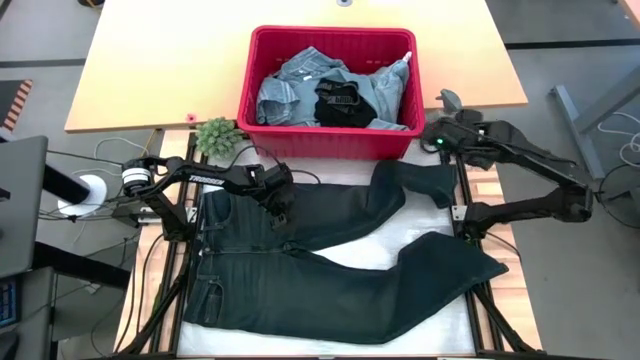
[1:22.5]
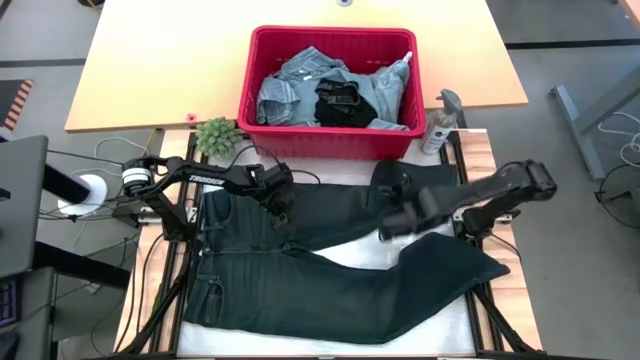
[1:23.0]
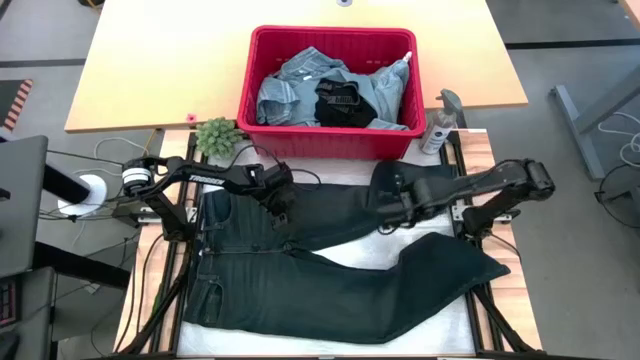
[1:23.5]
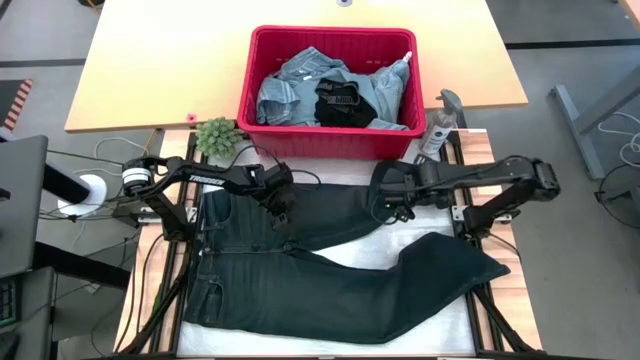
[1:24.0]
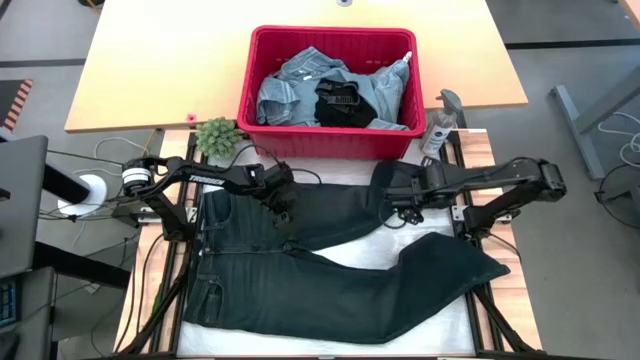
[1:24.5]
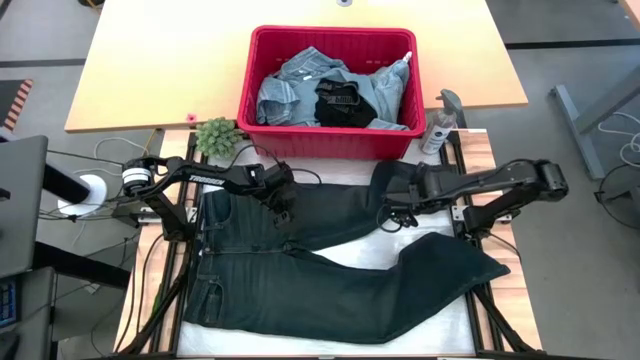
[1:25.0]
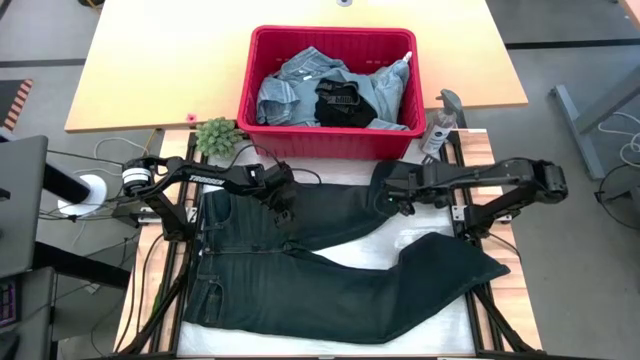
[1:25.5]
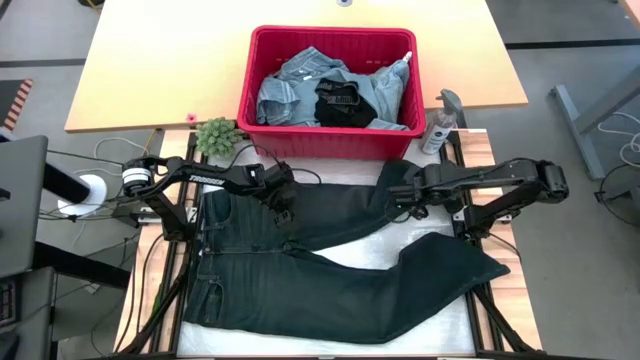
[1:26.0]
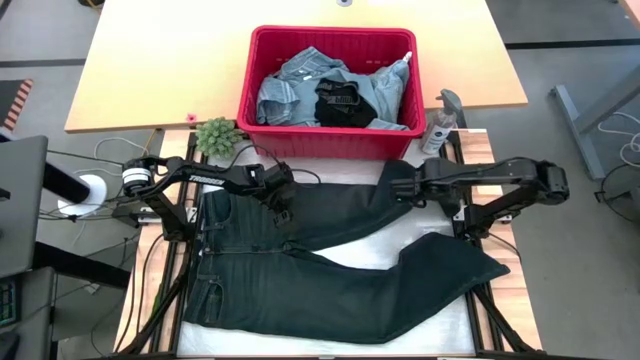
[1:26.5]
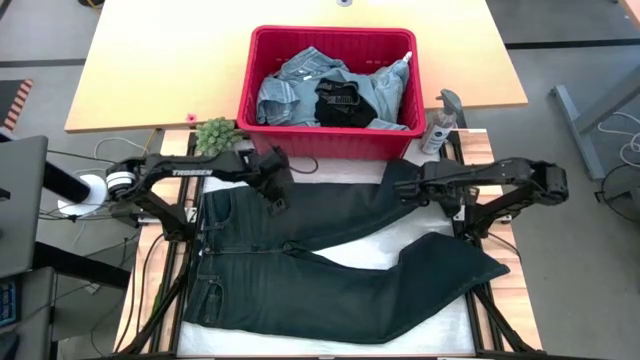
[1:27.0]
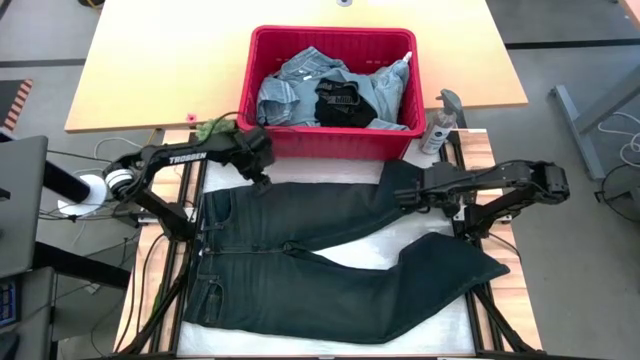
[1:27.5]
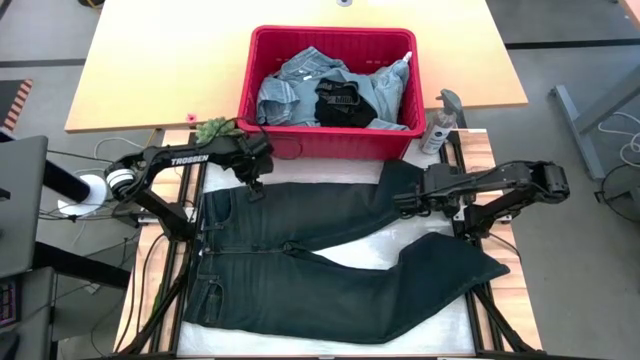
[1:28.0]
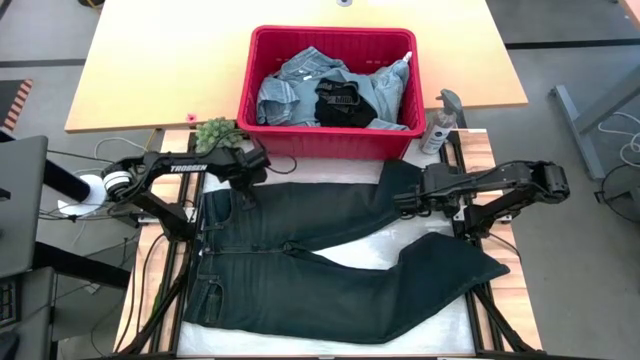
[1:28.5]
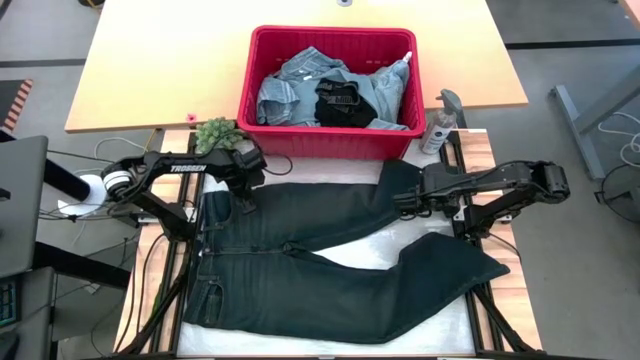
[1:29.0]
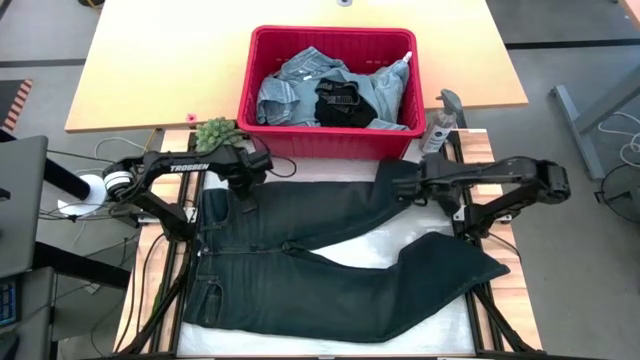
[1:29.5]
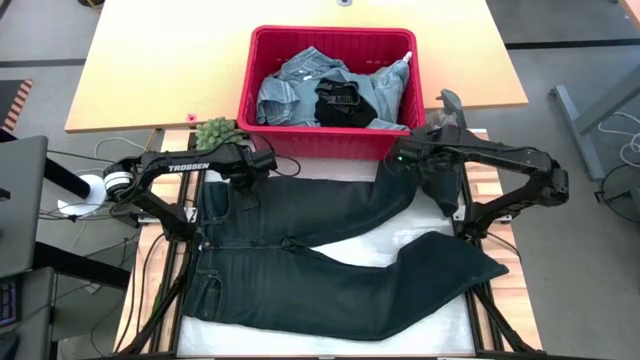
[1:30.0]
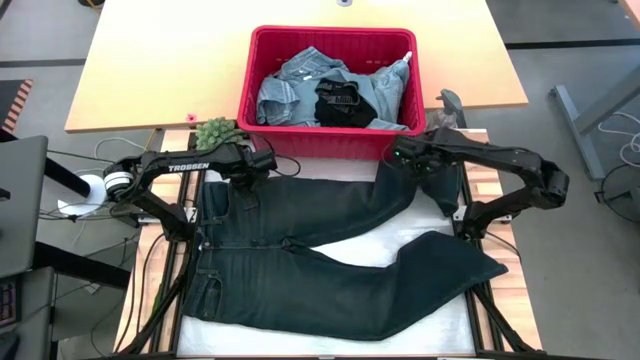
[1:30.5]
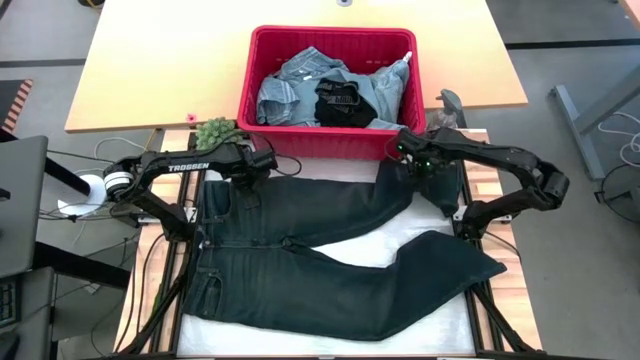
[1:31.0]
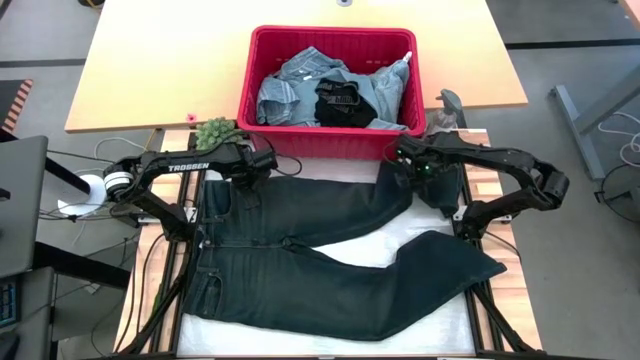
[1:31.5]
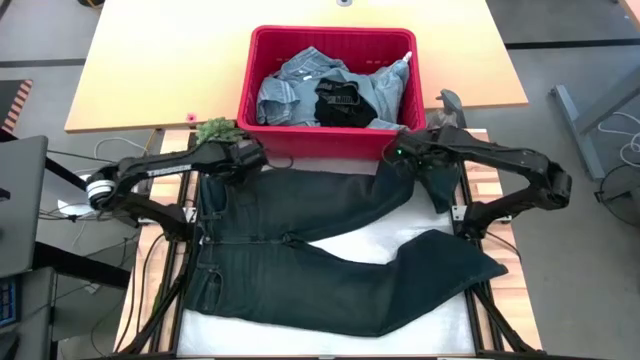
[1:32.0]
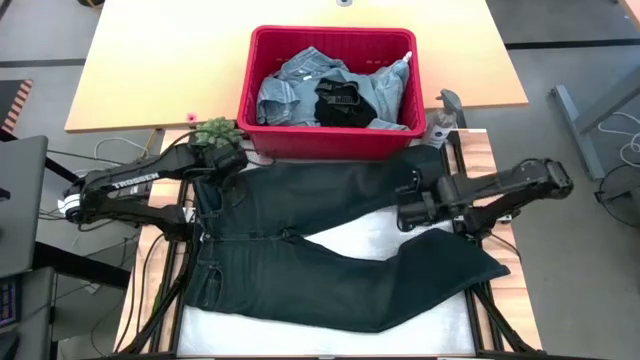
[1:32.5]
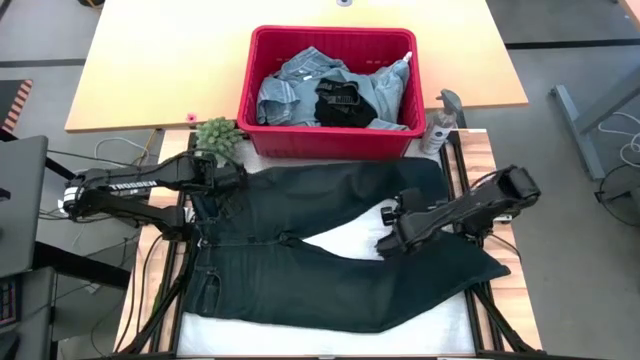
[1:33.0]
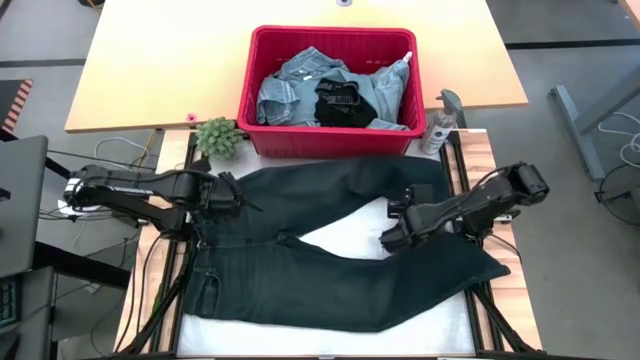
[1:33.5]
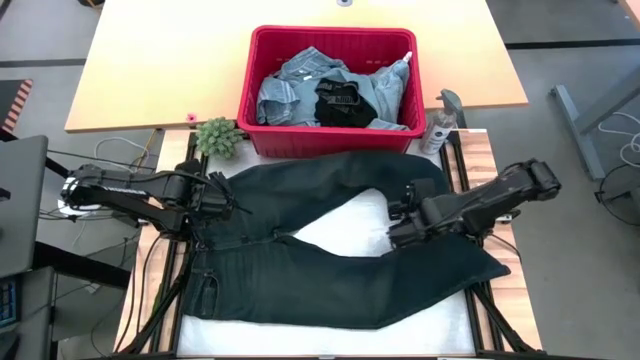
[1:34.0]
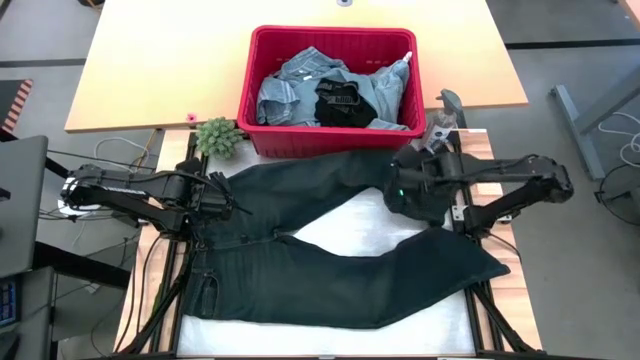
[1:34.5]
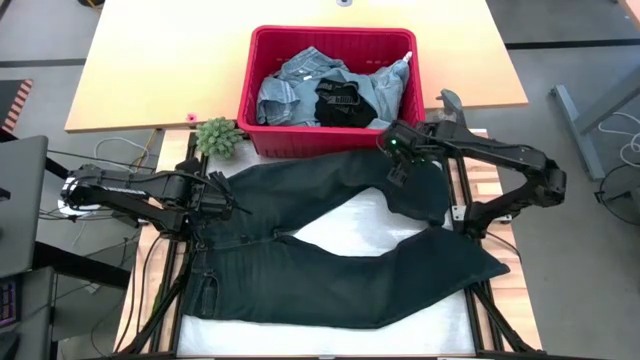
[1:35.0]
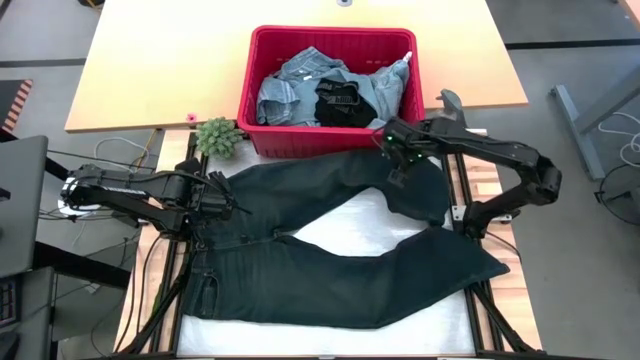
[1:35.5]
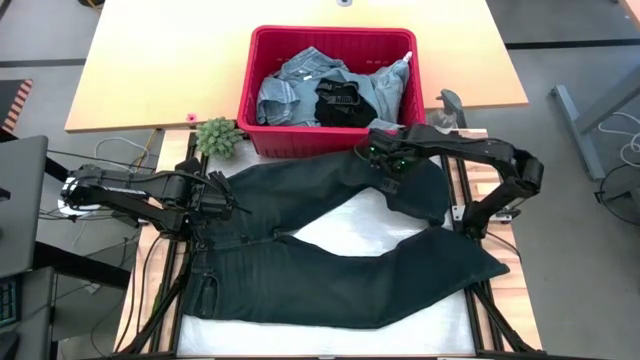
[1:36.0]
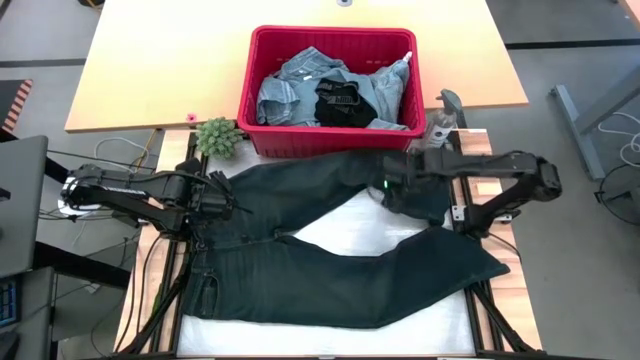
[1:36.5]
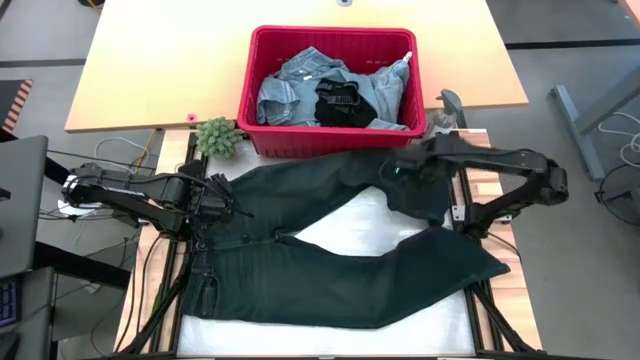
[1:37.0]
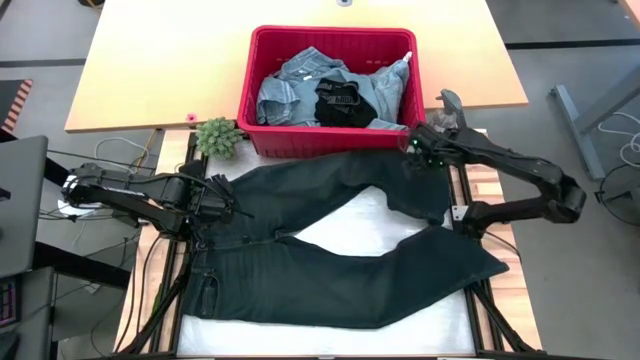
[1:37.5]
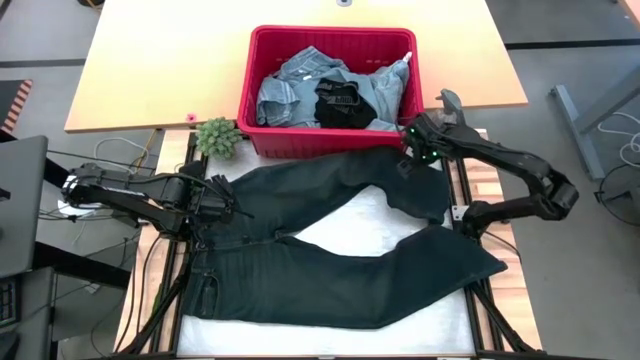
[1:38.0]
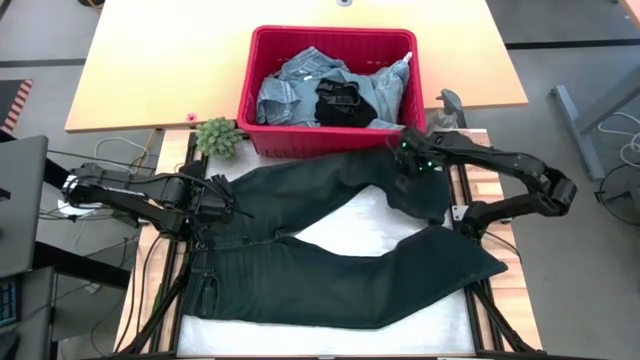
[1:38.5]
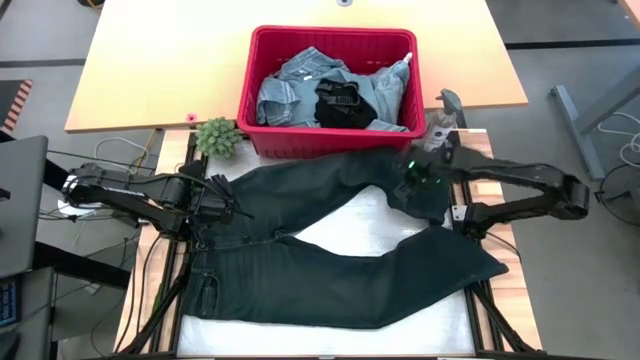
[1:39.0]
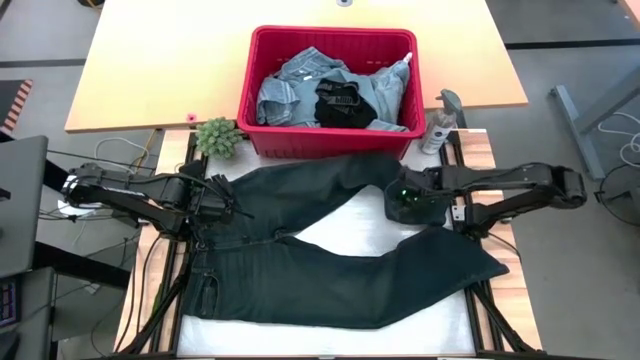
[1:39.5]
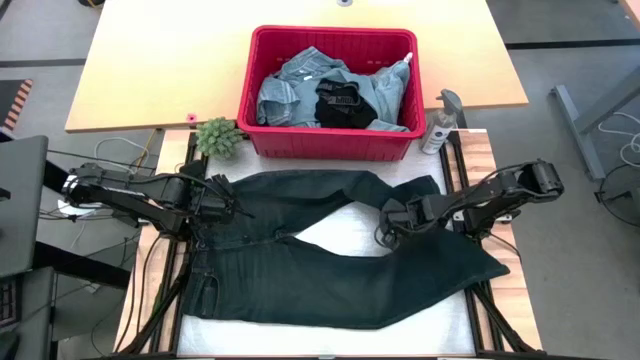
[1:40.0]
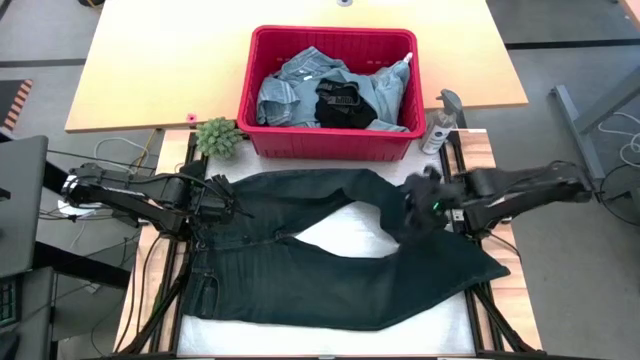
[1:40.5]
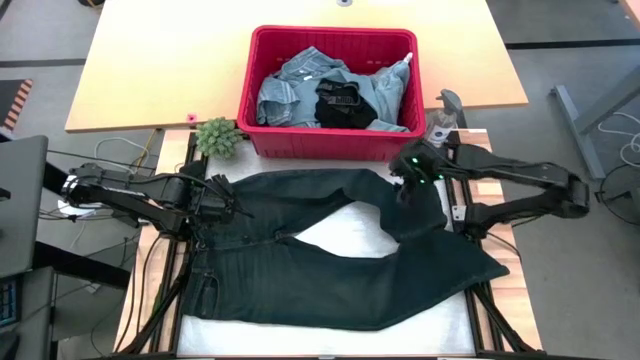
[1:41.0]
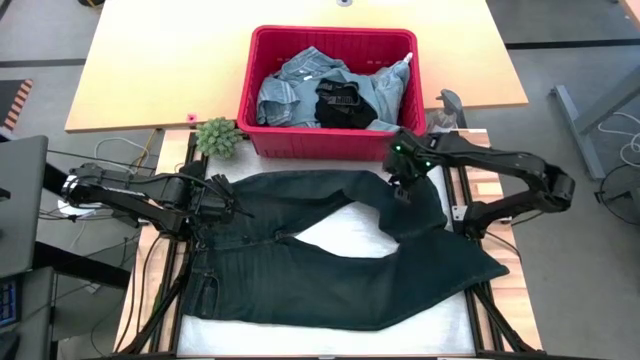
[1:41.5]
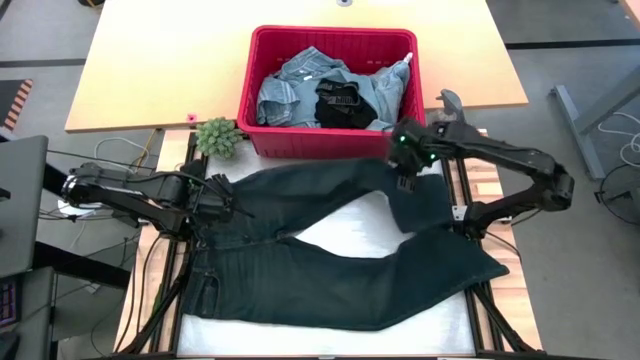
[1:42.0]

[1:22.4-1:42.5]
Task: Fold Laundry from Bin
Fold the black pants

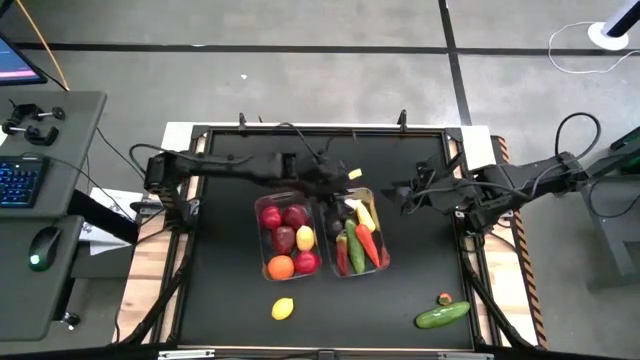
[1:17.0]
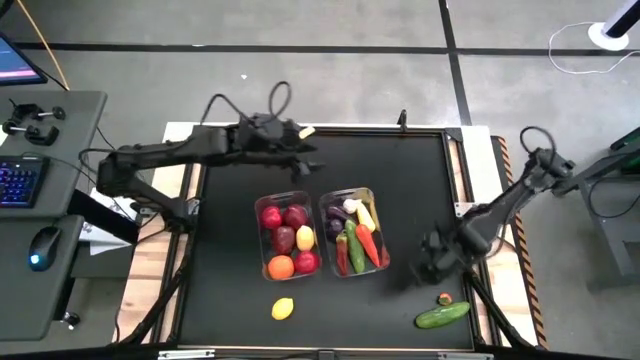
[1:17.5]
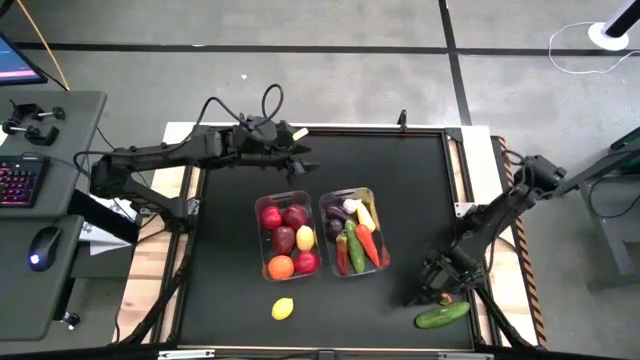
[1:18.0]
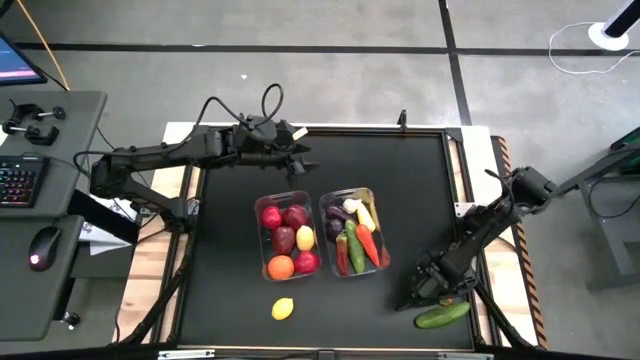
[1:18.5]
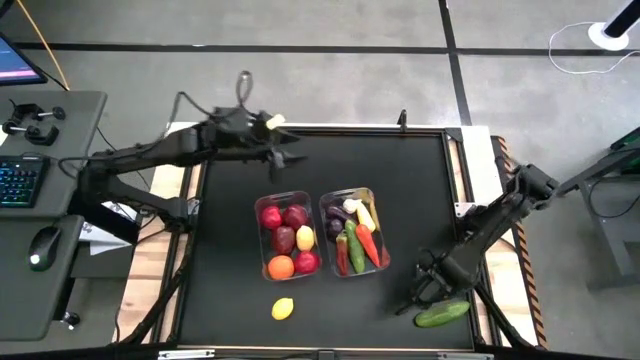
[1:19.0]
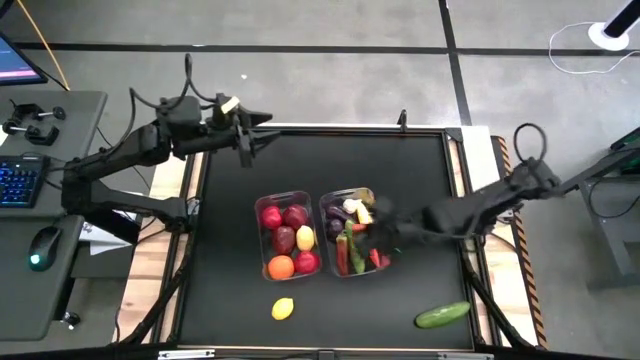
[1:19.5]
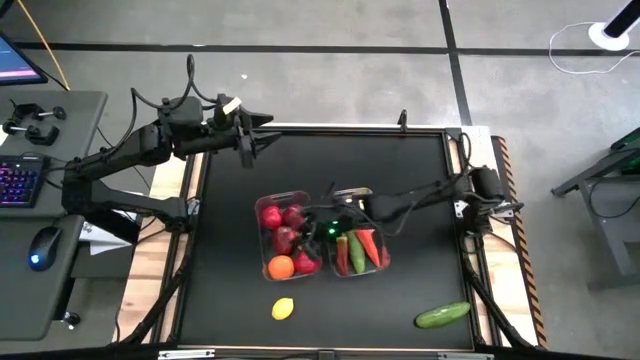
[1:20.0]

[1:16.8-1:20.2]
Task: Sort produce into baskets
Put the persimmon into the left transparent bin
